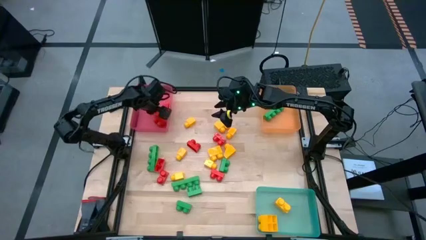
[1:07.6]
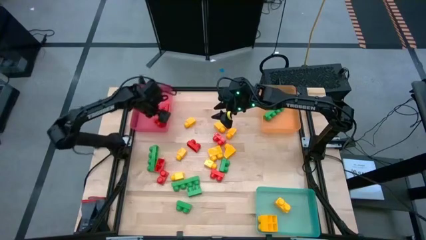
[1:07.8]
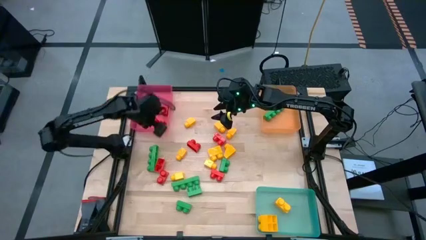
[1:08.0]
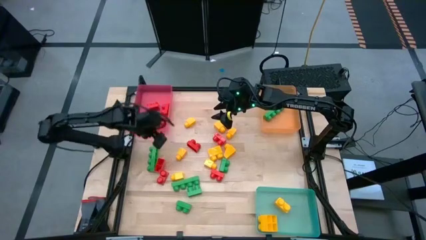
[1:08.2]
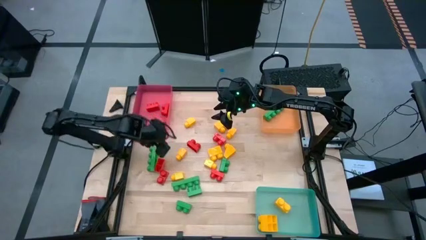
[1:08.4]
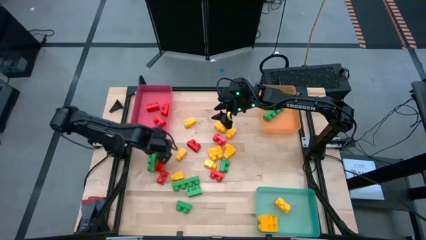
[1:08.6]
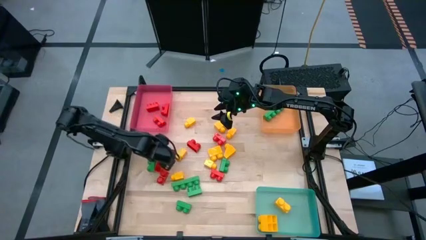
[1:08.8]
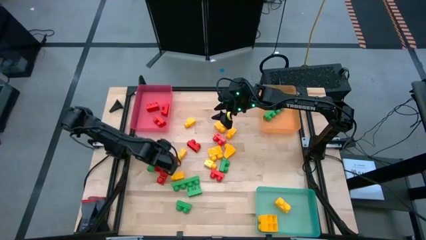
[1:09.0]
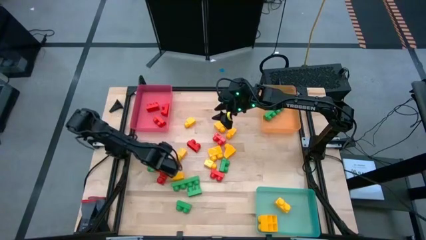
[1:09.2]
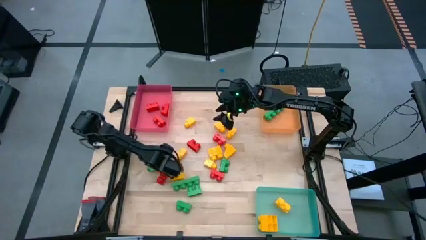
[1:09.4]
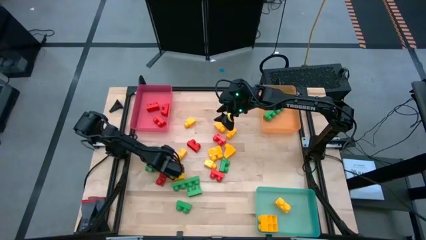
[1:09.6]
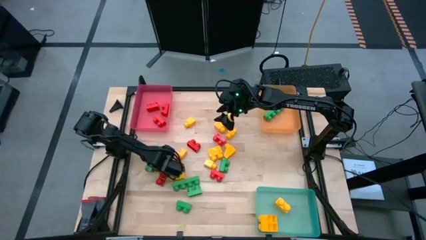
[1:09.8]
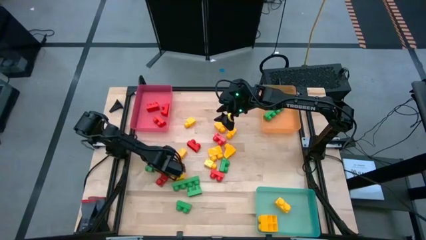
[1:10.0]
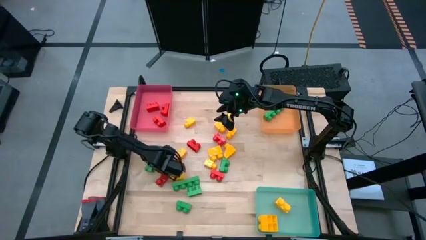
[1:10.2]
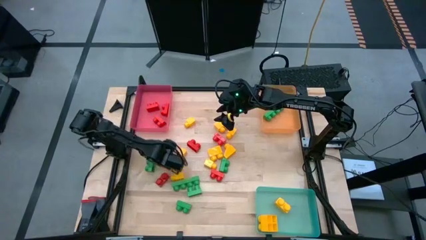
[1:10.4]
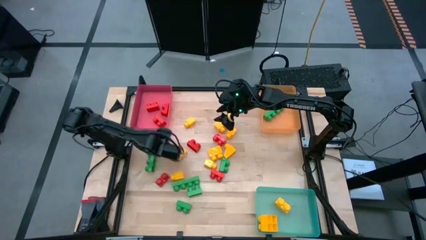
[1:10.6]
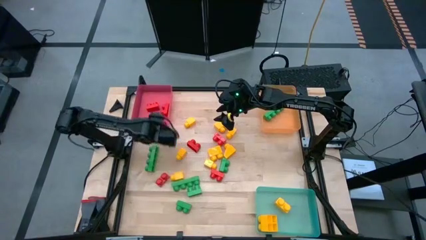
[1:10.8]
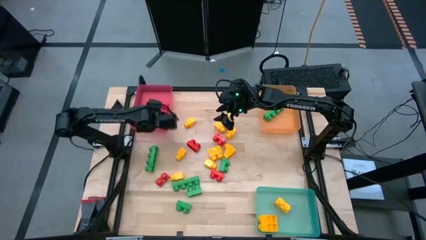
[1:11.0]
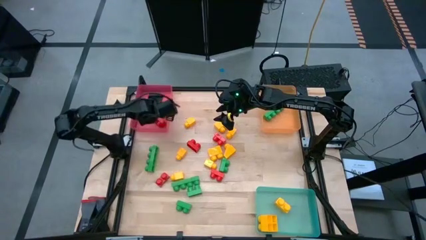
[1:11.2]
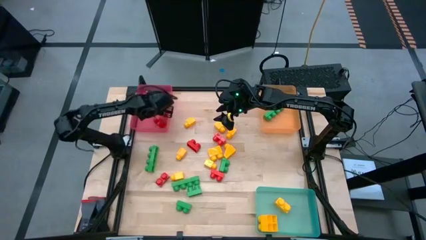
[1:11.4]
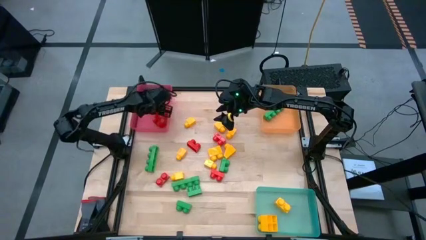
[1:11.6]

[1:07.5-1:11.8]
Task: Sort blocks
Put the red game piece into the red bin

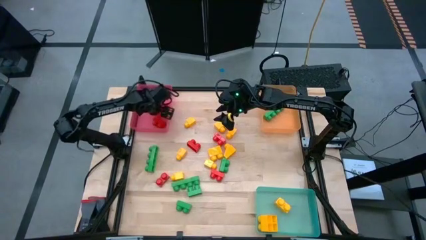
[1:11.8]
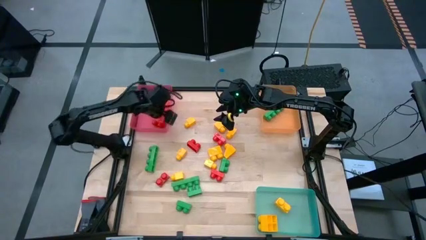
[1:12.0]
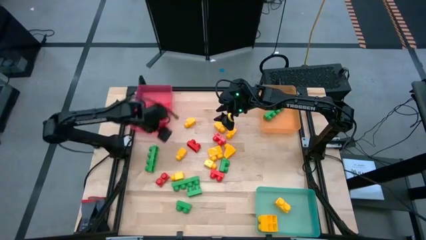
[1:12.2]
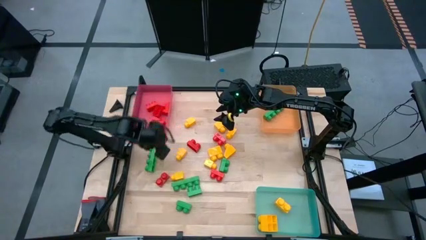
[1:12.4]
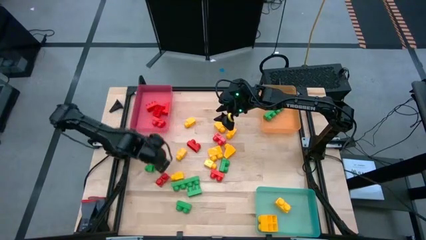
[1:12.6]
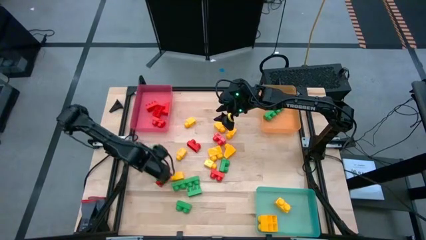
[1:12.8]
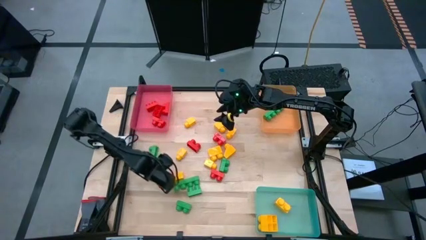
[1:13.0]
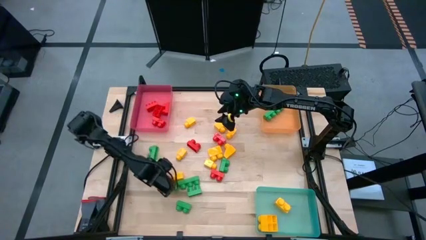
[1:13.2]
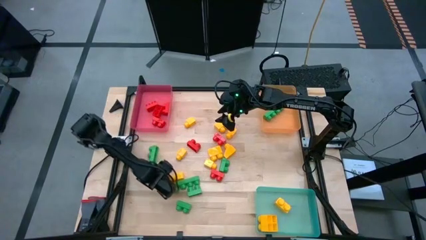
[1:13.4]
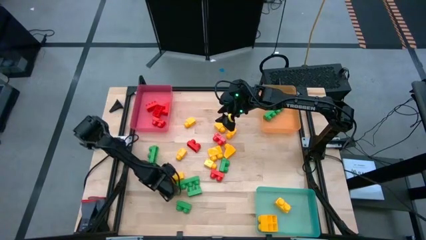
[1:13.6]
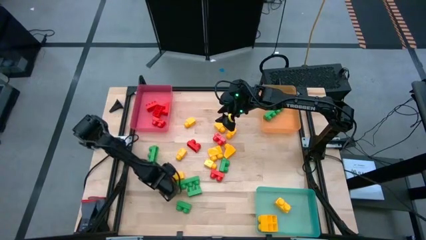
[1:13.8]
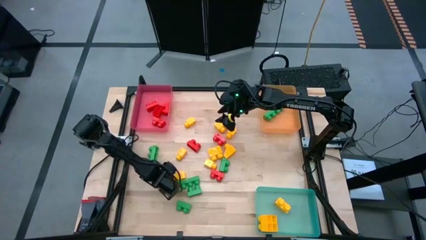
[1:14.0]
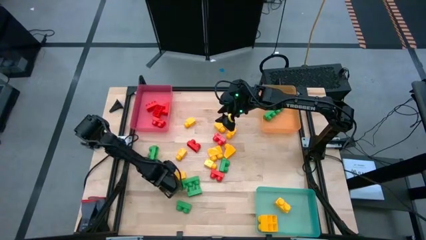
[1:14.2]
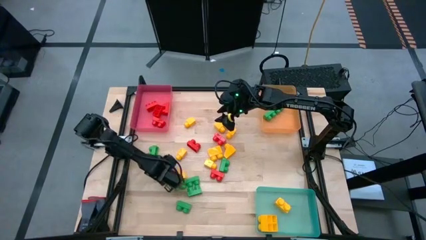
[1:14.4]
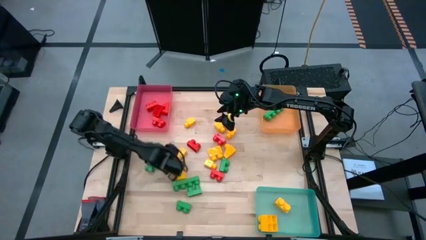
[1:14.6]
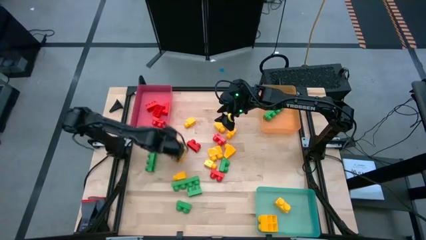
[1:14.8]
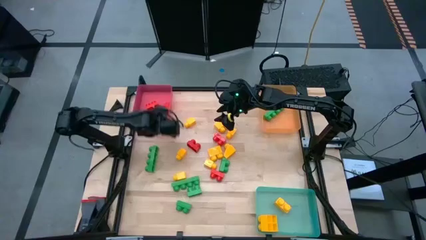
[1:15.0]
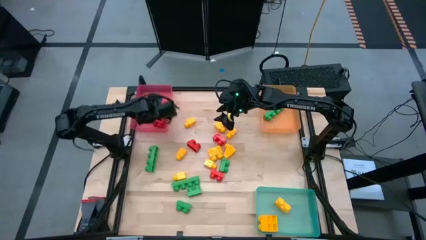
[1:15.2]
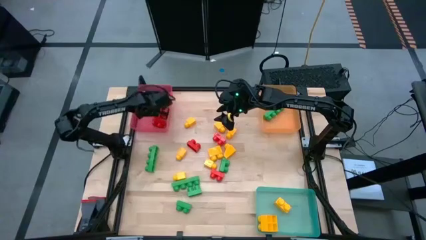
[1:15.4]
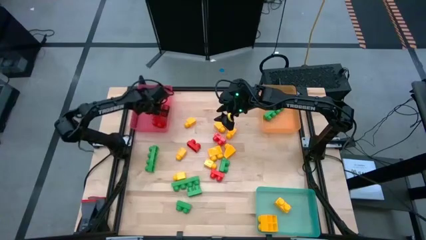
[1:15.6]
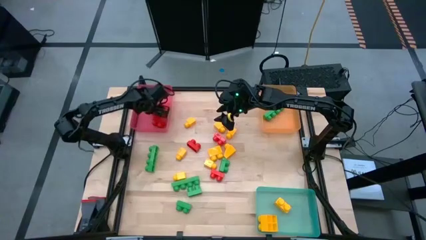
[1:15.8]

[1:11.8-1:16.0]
Put the red game piece into the red bin

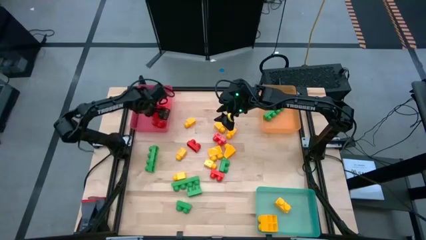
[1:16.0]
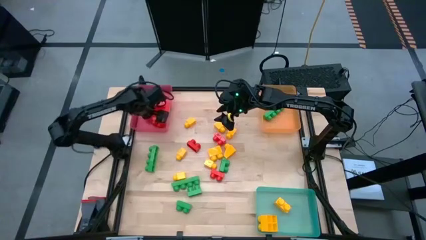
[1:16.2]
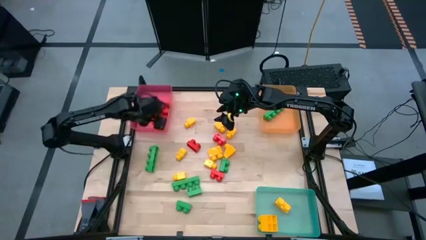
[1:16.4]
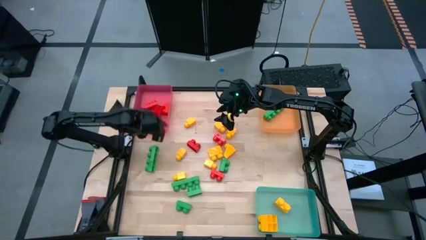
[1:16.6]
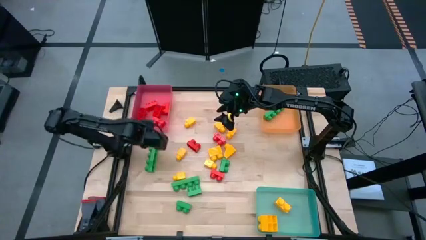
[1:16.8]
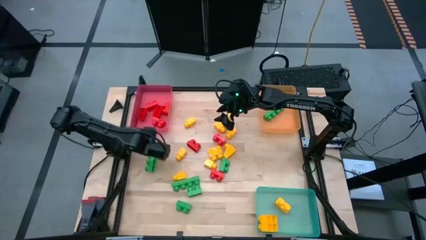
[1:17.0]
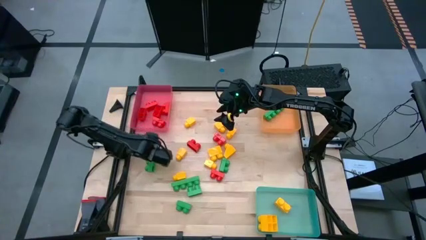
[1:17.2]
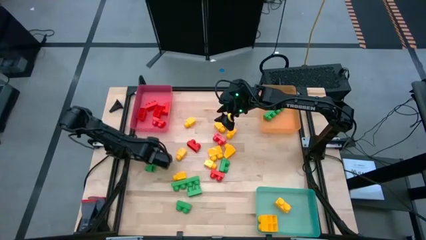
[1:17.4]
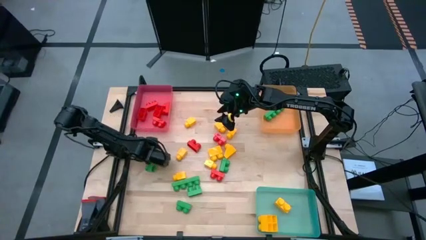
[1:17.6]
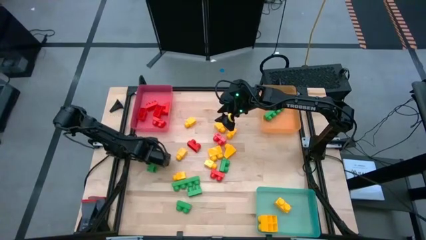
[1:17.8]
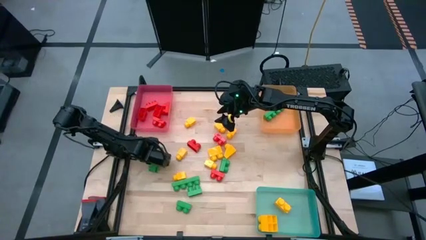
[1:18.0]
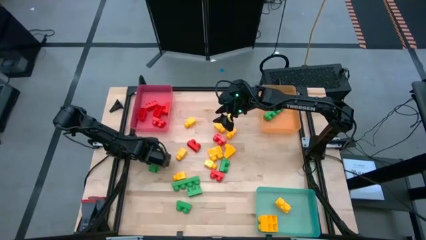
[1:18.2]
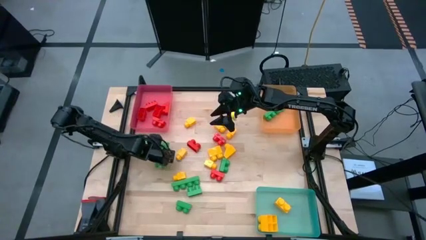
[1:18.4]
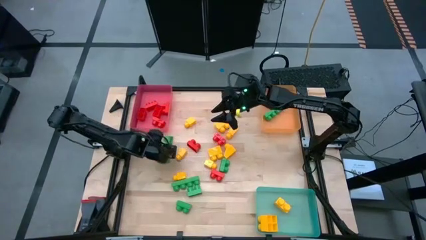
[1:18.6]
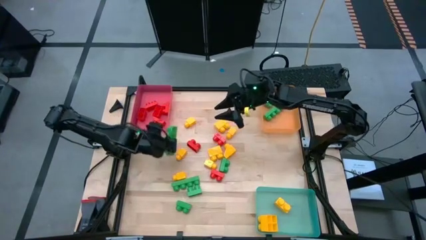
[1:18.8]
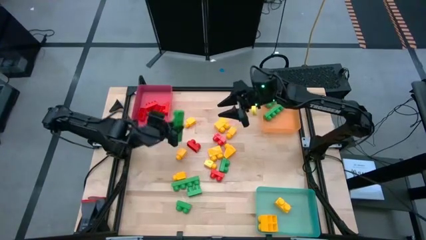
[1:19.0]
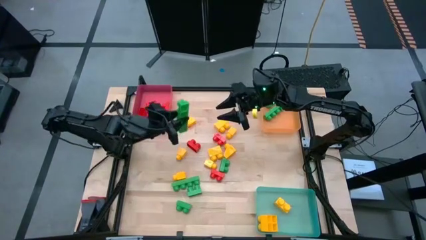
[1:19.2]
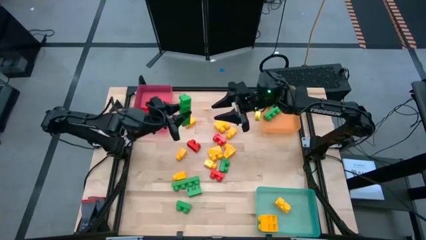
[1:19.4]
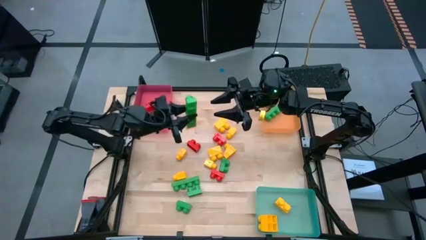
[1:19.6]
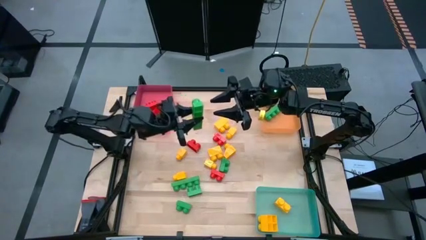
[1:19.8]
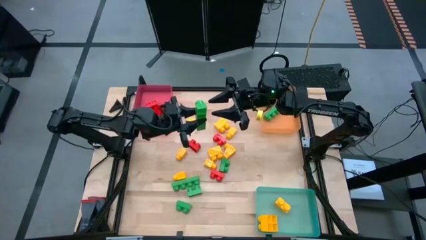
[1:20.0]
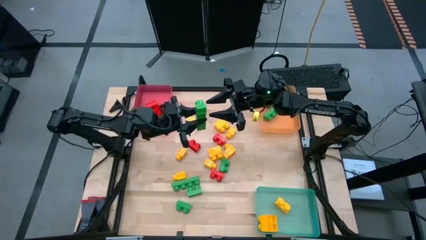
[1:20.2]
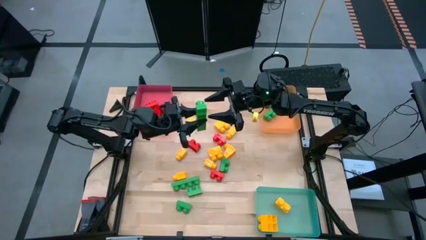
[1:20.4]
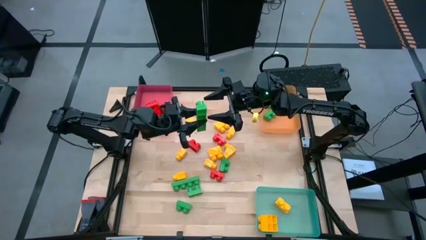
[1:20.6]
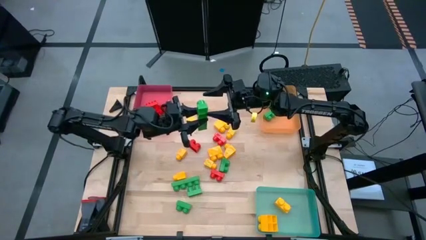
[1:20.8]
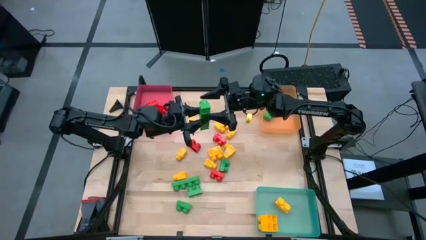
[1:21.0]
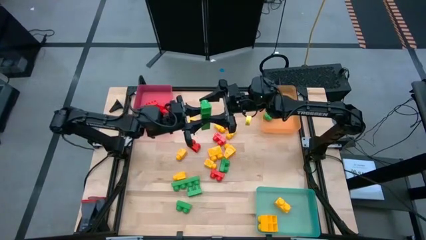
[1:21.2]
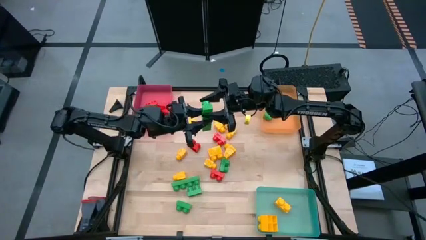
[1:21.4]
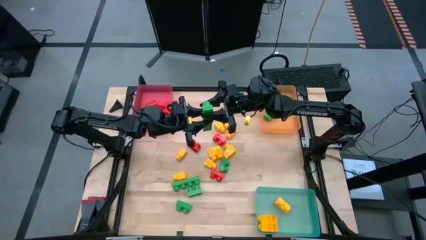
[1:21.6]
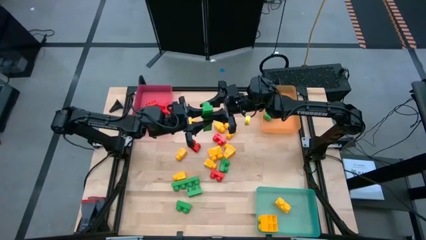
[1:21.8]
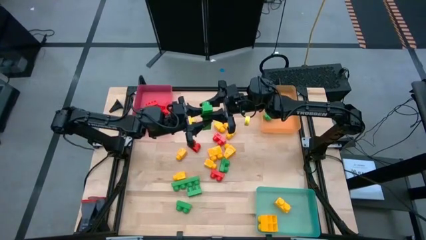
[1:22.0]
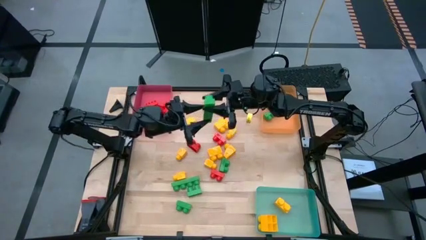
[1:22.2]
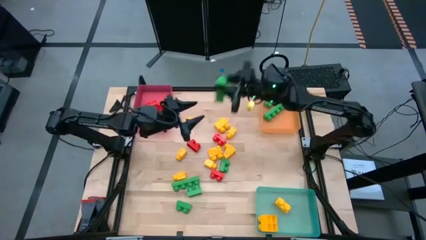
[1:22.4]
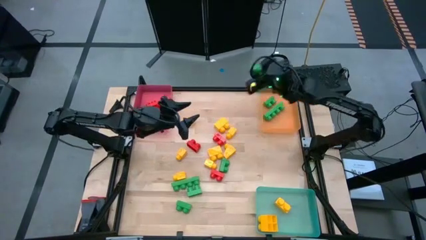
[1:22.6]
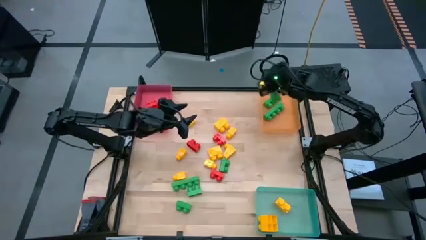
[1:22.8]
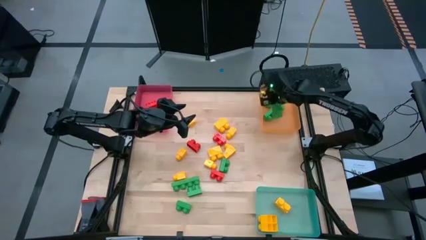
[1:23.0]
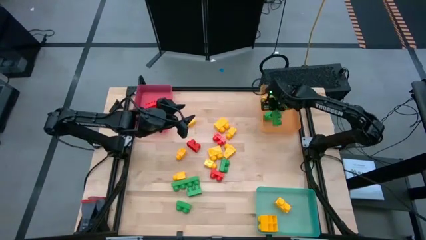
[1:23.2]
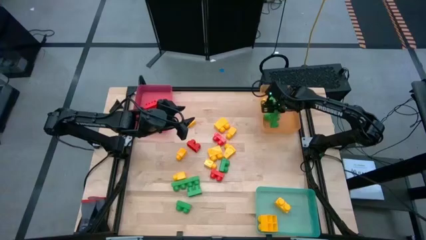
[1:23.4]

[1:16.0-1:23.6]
Put the green game piece into the orange bin

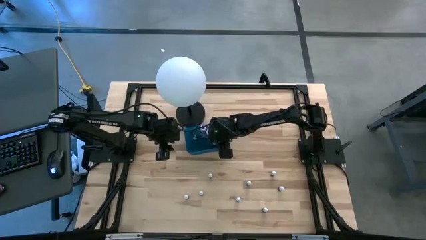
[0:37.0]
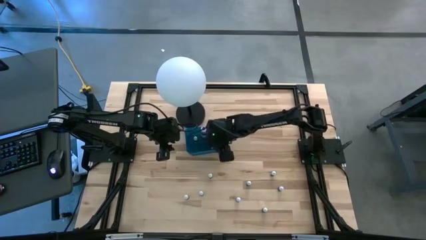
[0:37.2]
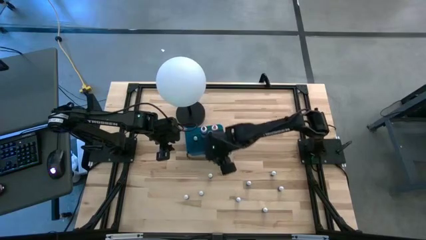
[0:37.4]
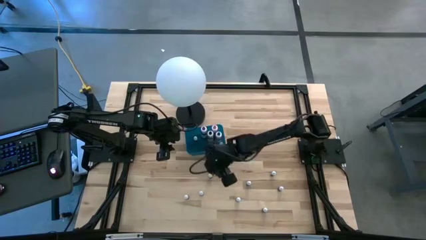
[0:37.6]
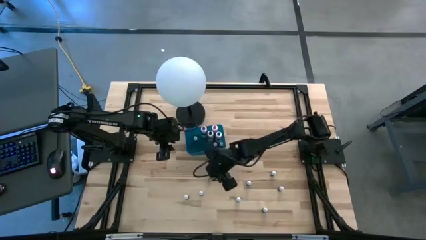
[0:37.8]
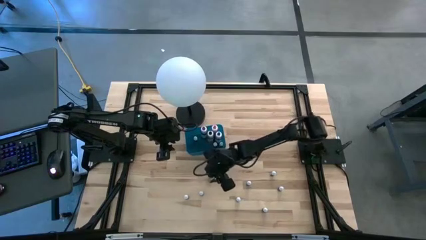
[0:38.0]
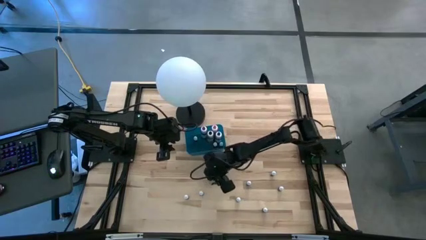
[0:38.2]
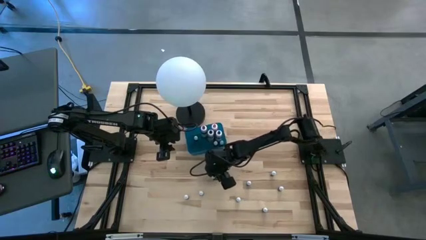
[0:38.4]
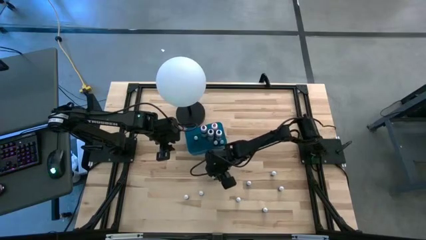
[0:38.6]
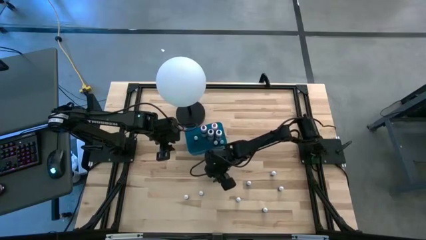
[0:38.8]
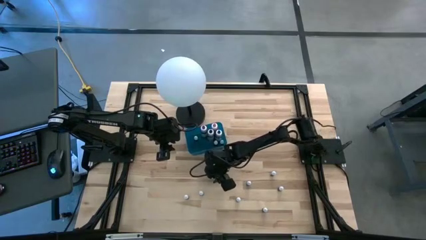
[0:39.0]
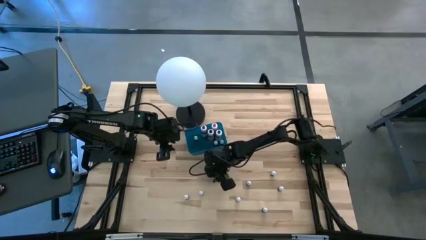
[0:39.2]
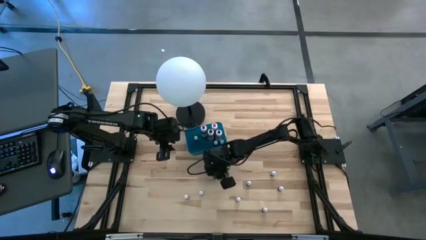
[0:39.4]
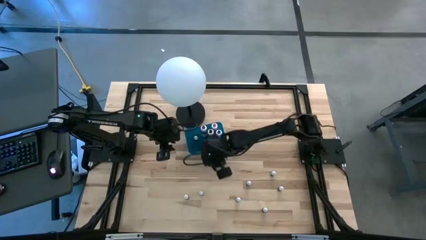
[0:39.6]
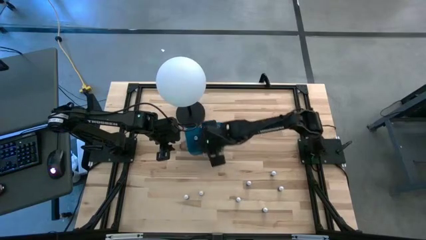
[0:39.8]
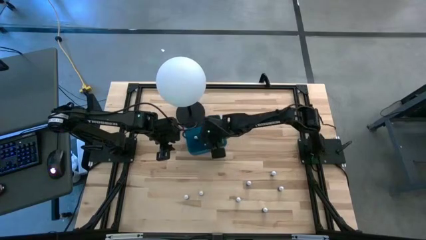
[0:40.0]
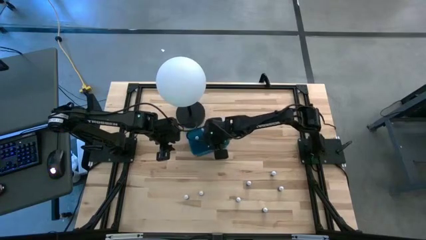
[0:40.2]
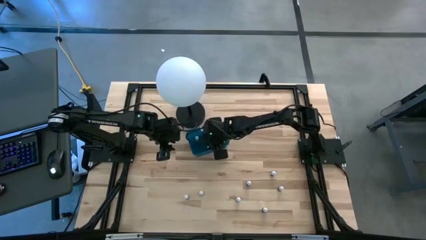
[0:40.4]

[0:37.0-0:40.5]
Task: Pick & Place food coloring
Put the small violet food coloring bottle into the blue container
